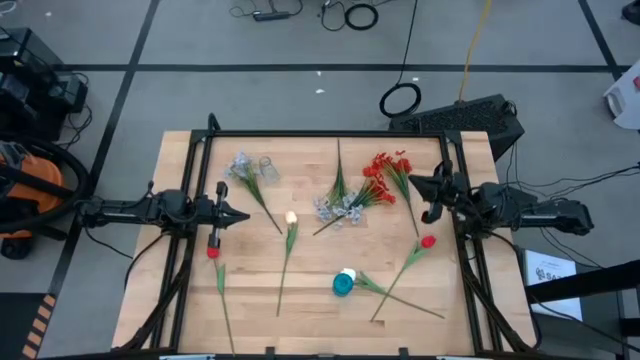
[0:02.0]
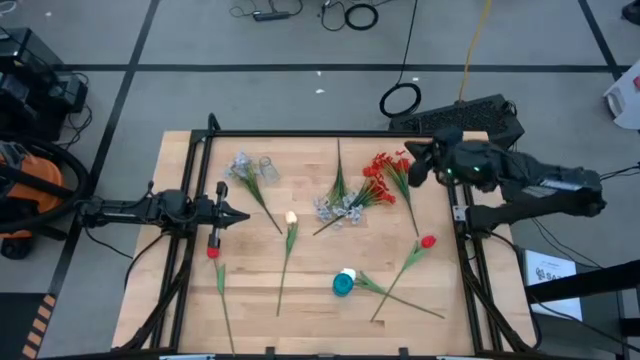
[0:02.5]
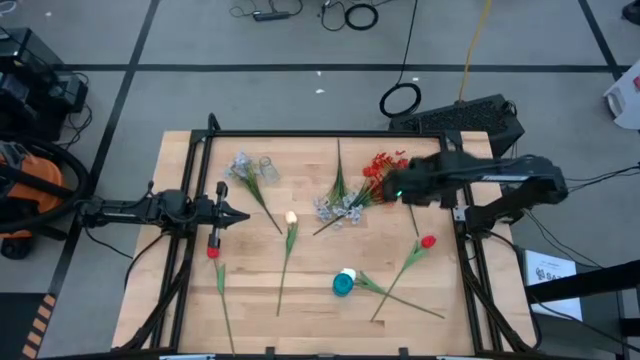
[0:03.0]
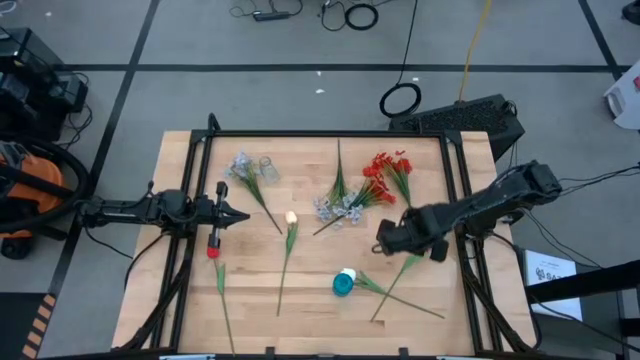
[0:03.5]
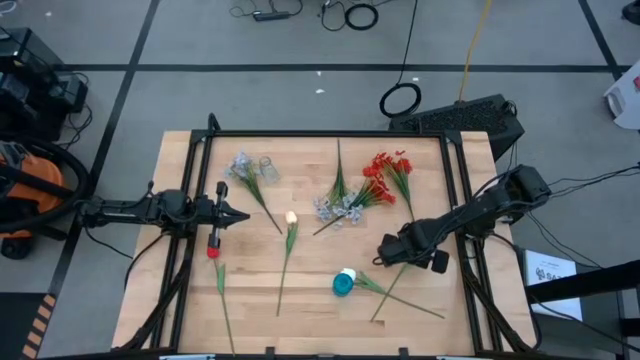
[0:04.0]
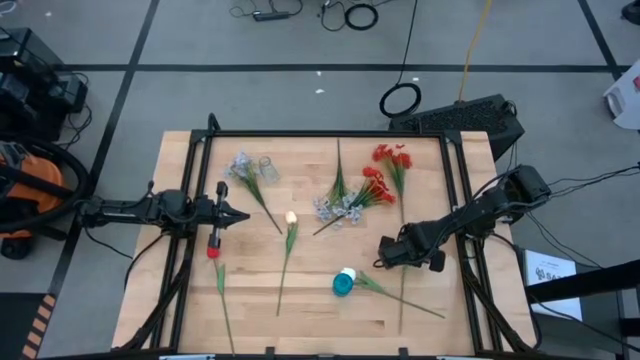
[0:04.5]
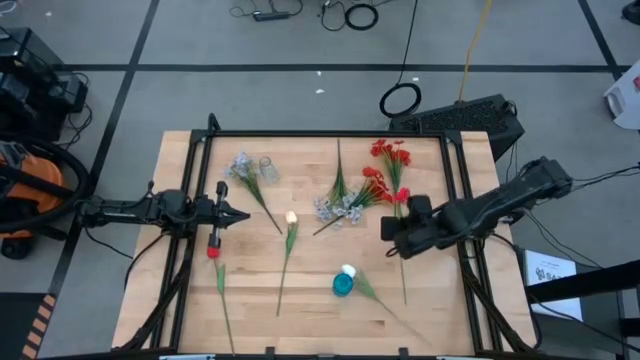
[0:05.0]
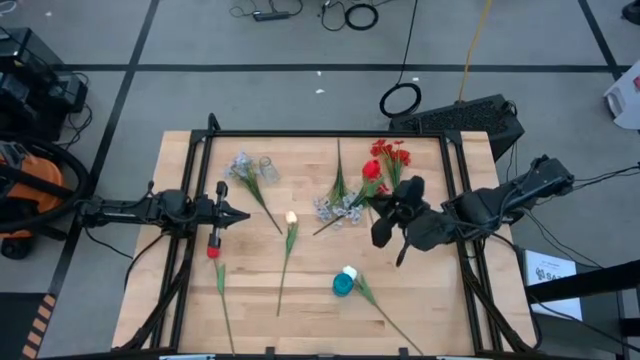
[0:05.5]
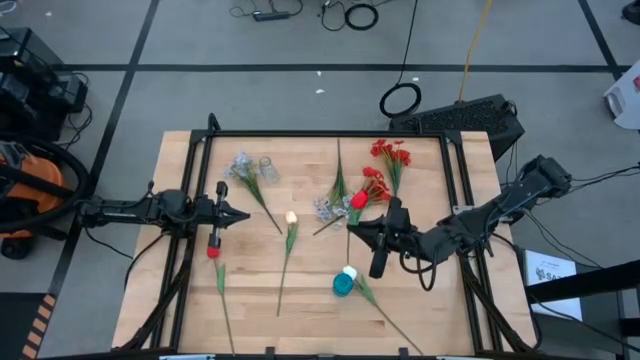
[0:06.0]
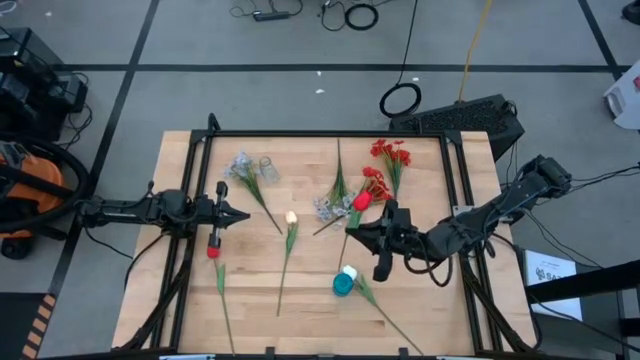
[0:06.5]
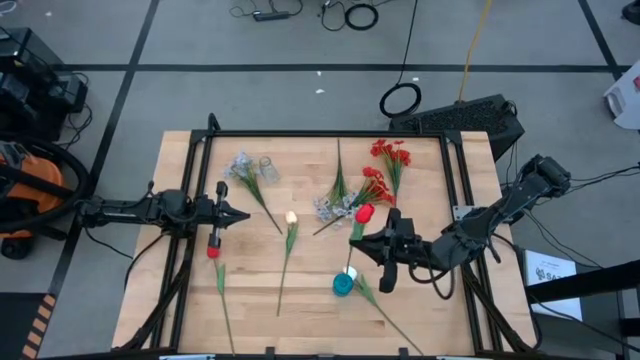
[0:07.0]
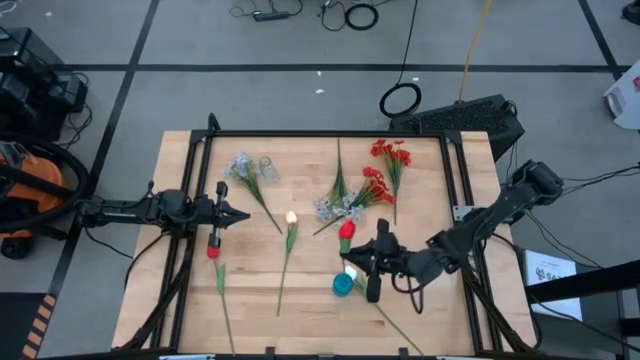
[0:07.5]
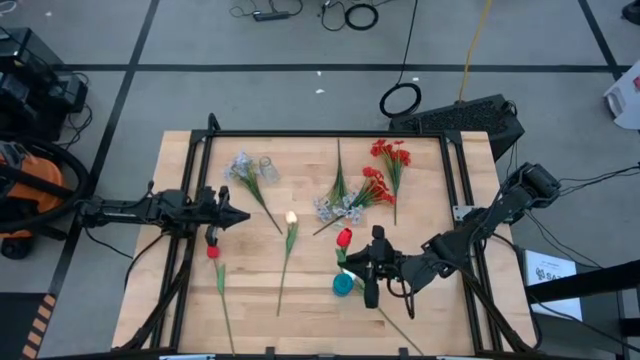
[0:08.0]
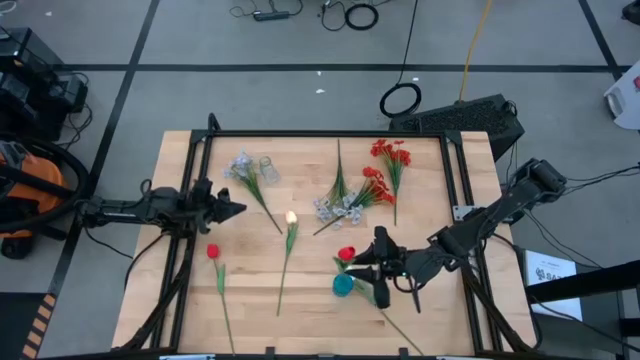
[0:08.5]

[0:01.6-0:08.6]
Task: Sort flowers into vase by color
Put the right red tulip into the blue vase

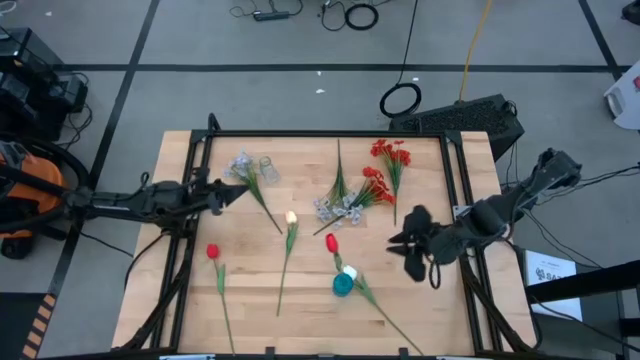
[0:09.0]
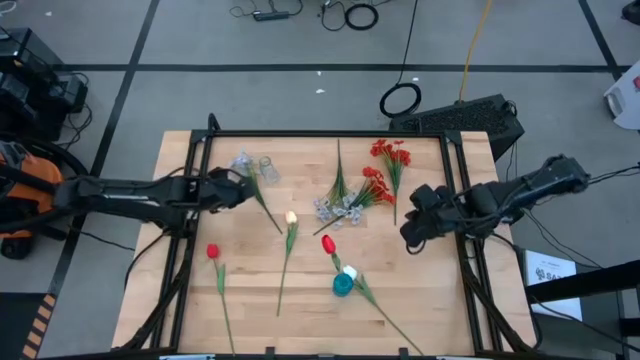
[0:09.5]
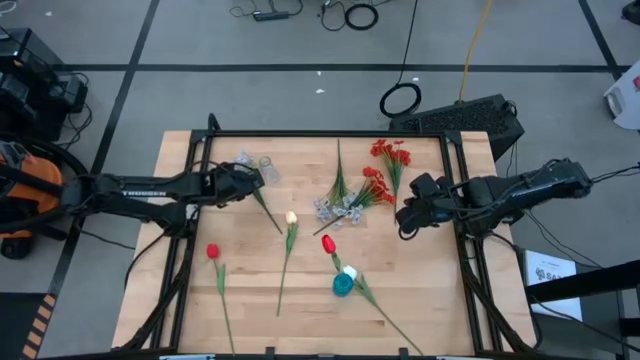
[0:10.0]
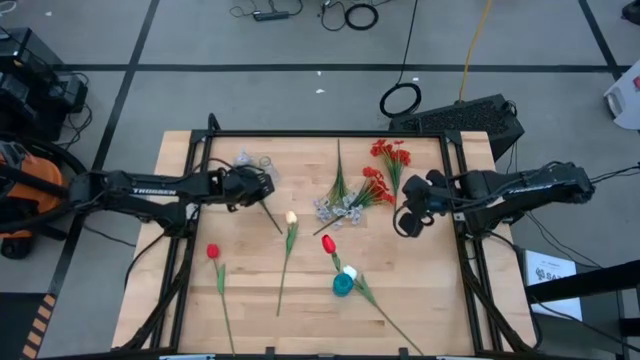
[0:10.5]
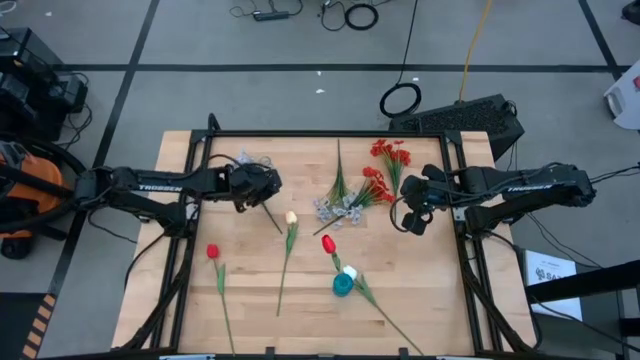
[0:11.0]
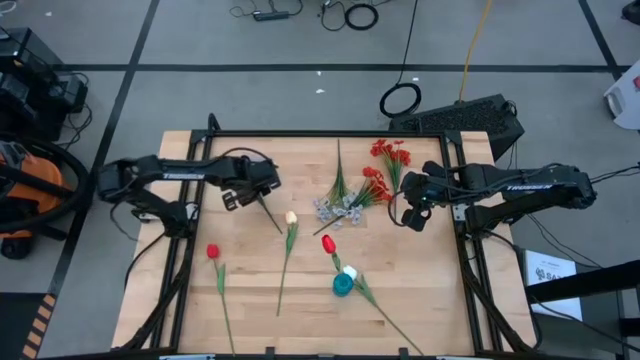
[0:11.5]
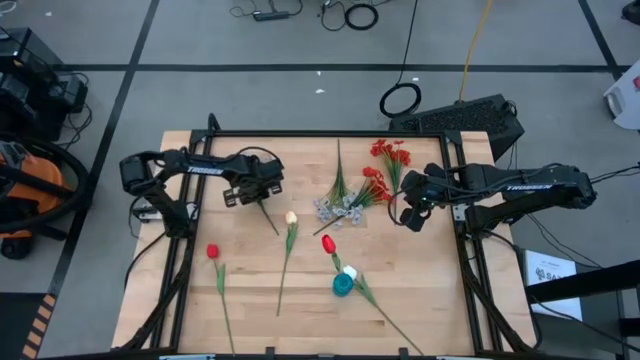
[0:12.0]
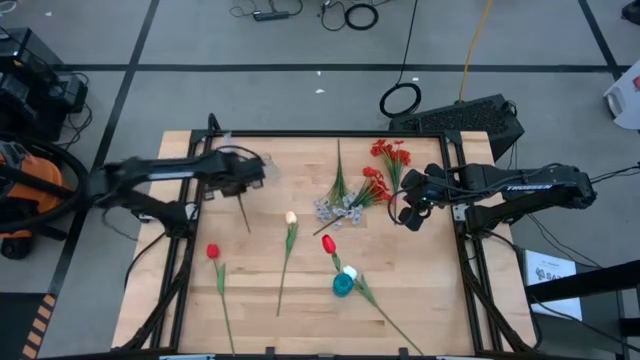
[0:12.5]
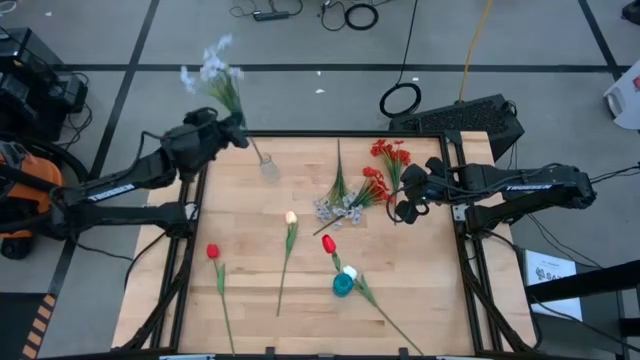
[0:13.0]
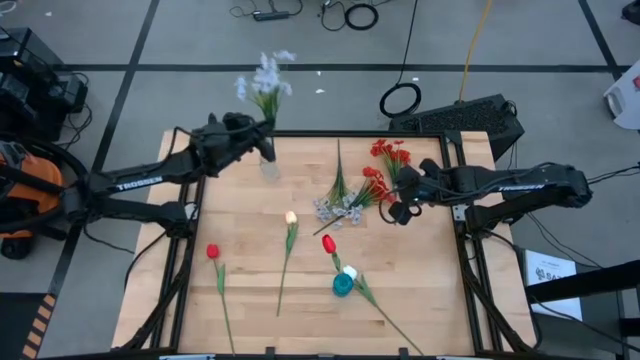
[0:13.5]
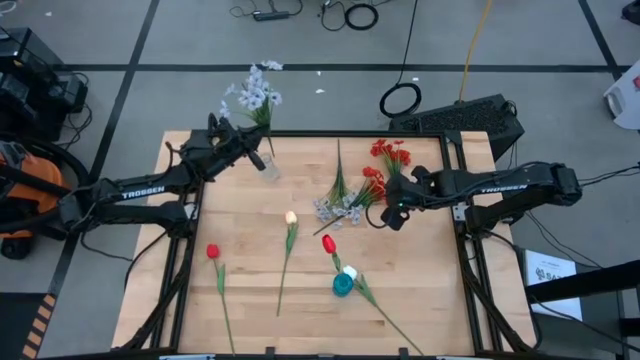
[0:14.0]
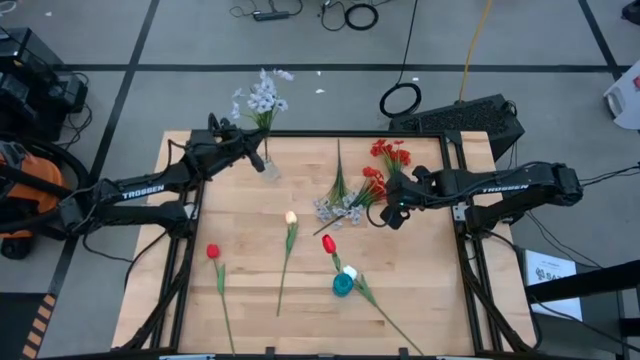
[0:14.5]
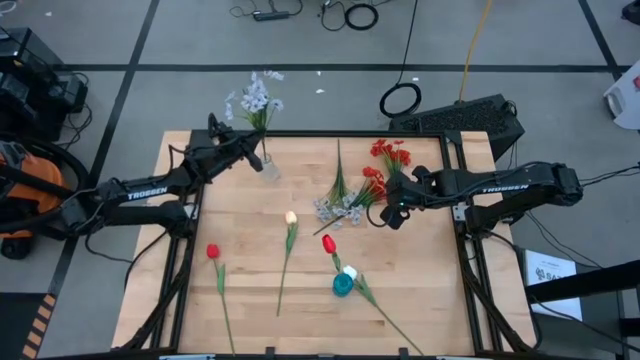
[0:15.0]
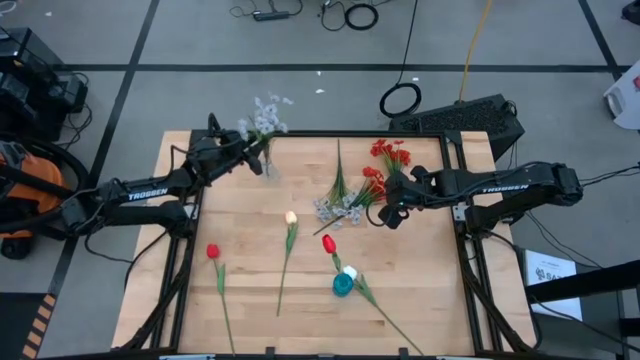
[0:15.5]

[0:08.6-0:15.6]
Put the left white poppies into the transparent vase

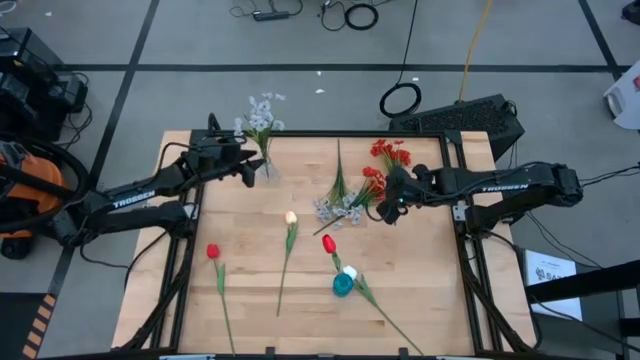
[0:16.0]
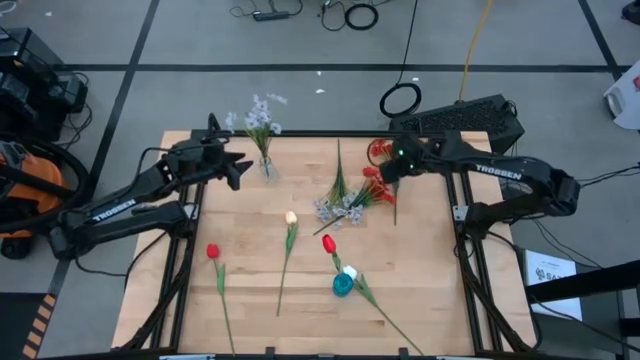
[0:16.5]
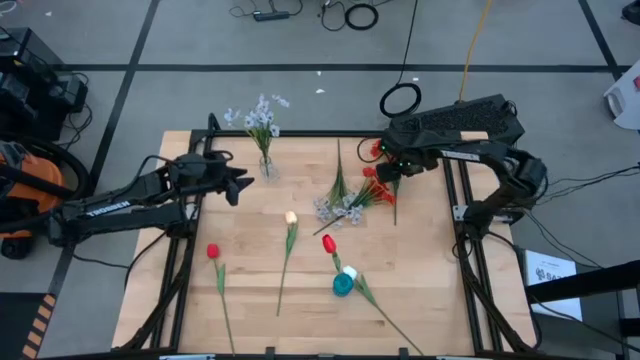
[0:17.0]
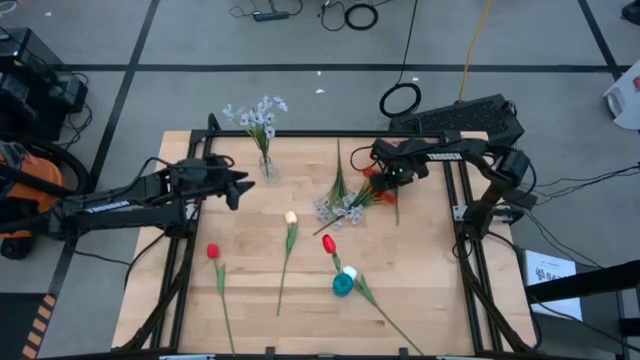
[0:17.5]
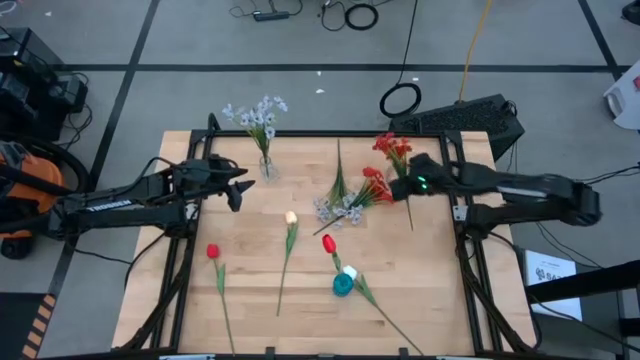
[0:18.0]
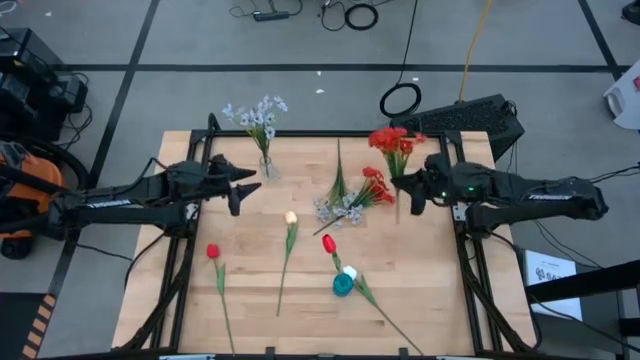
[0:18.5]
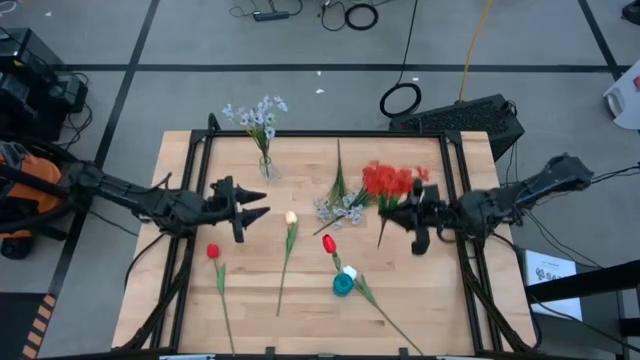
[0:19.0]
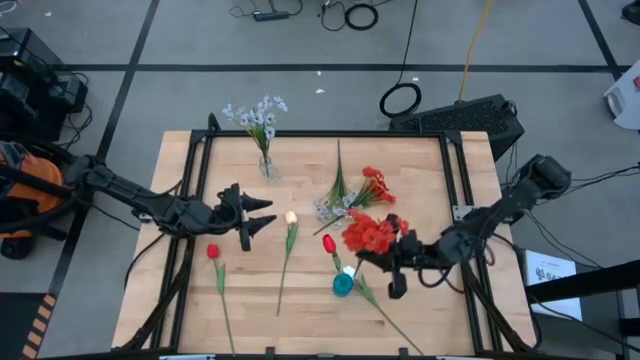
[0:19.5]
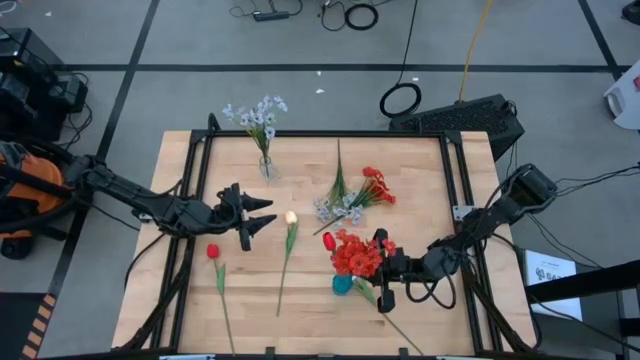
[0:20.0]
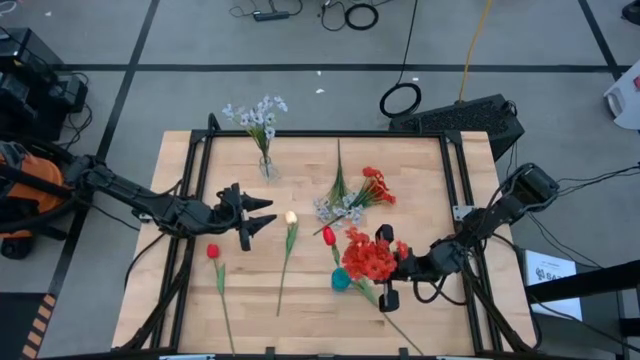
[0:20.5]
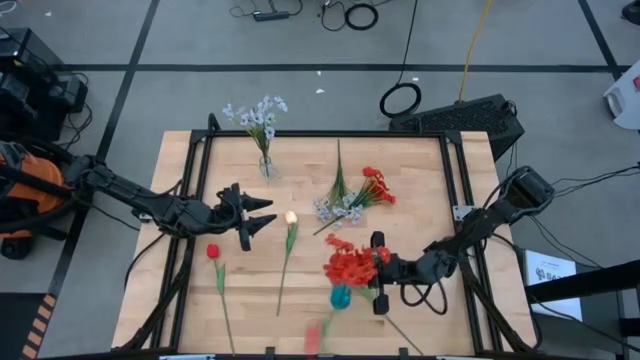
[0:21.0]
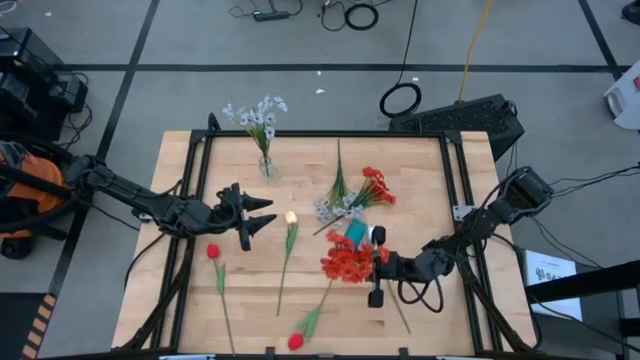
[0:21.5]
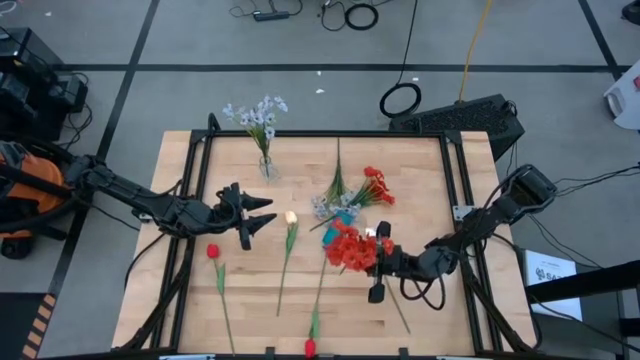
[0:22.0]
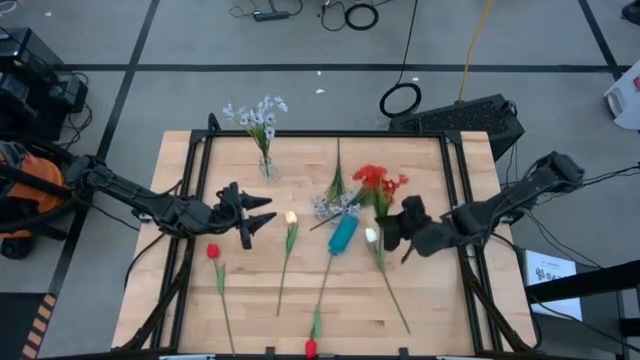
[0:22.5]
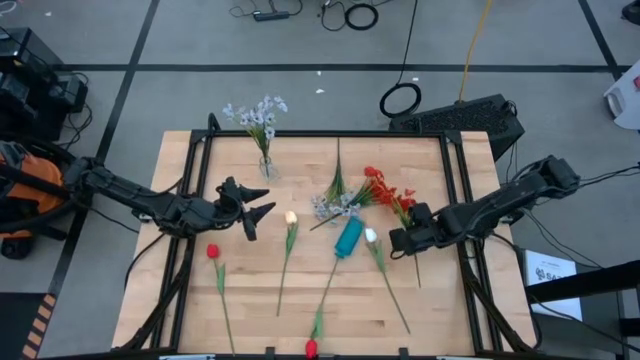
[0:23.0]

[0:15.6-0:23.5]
Put the right red poppies into the blue vase
